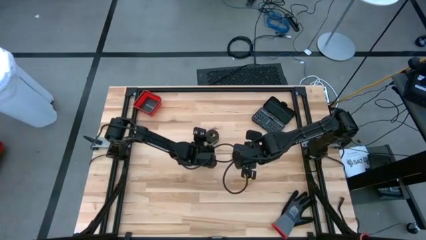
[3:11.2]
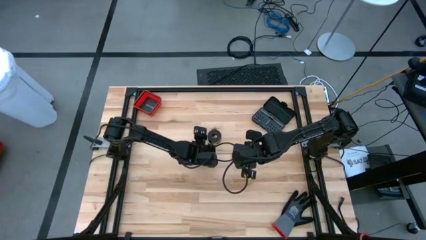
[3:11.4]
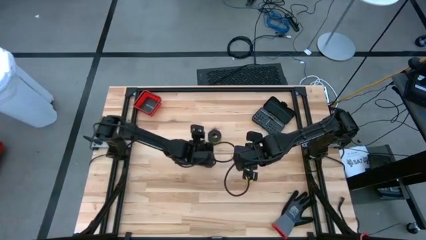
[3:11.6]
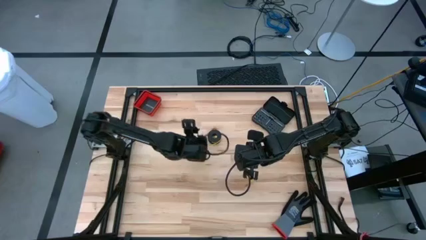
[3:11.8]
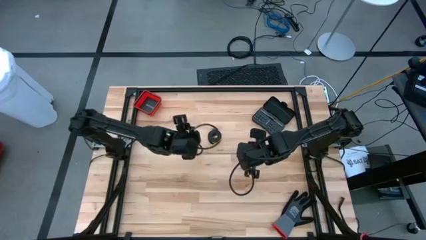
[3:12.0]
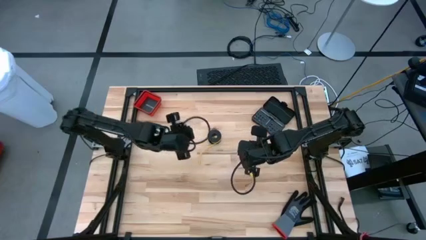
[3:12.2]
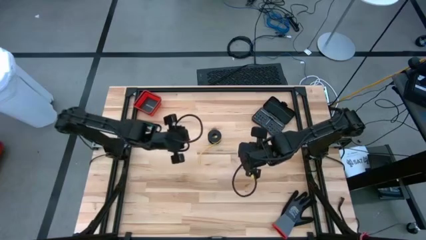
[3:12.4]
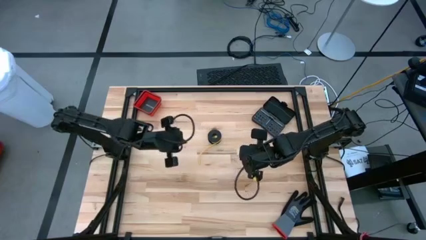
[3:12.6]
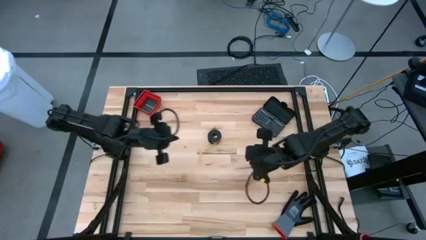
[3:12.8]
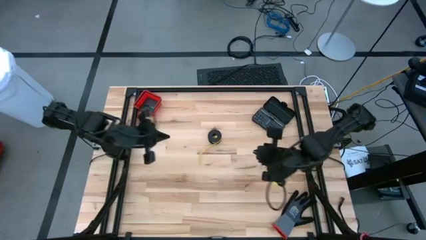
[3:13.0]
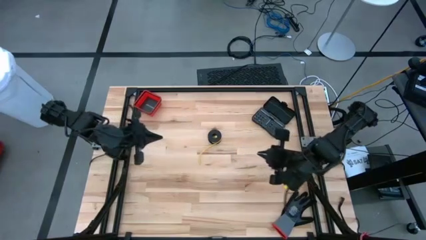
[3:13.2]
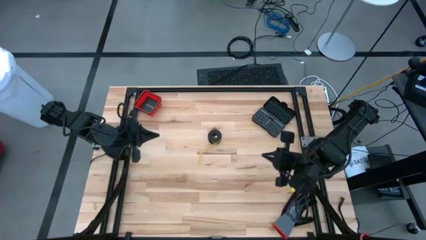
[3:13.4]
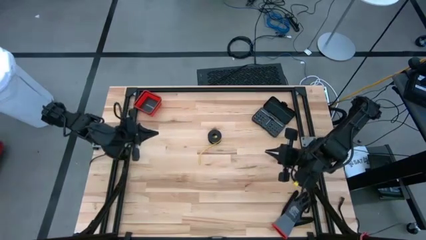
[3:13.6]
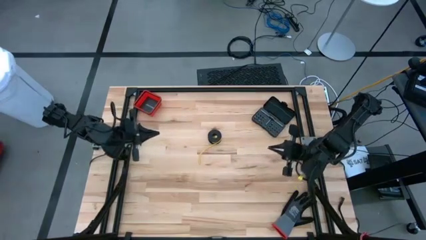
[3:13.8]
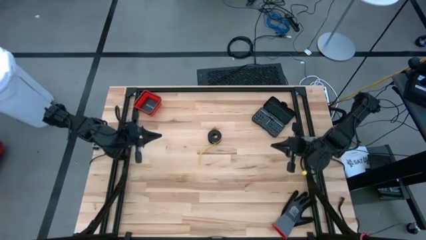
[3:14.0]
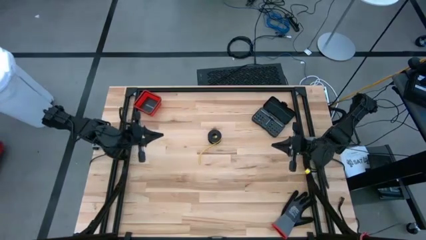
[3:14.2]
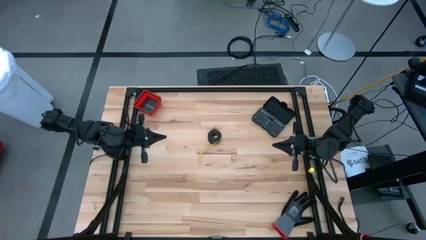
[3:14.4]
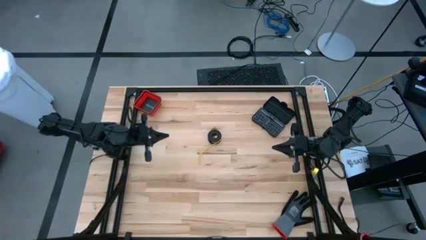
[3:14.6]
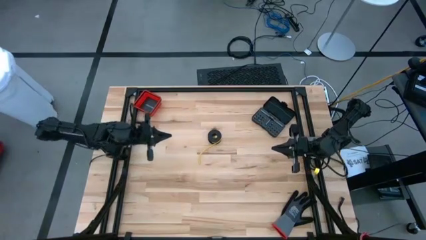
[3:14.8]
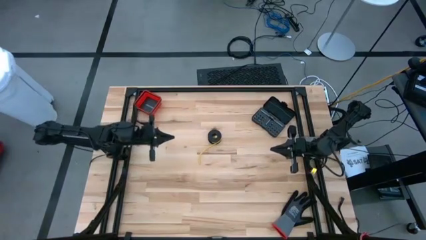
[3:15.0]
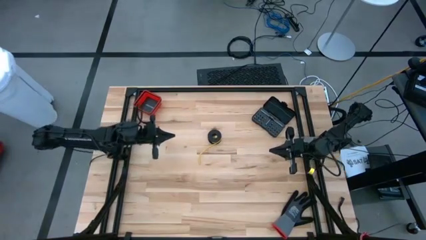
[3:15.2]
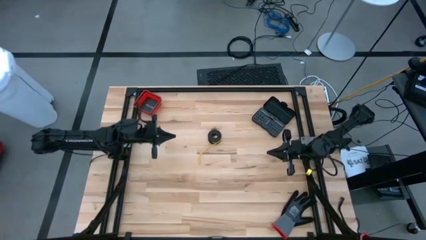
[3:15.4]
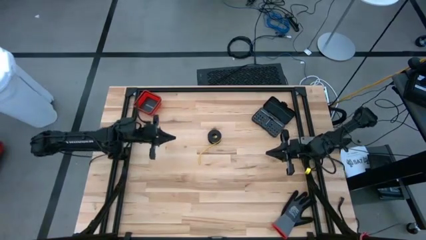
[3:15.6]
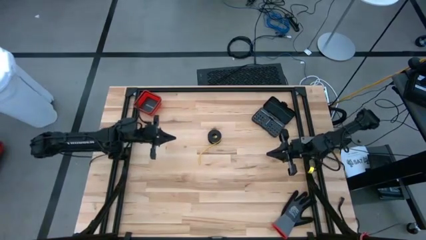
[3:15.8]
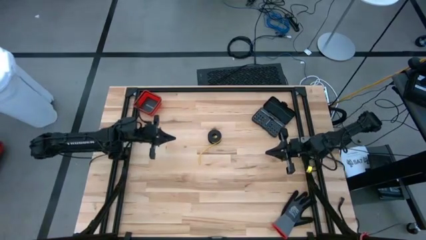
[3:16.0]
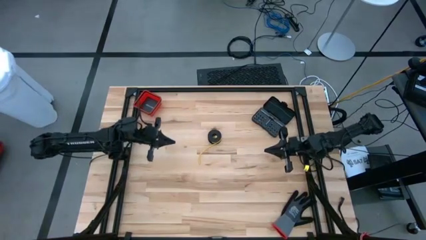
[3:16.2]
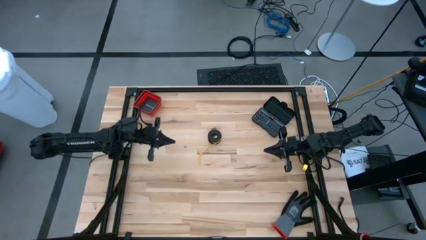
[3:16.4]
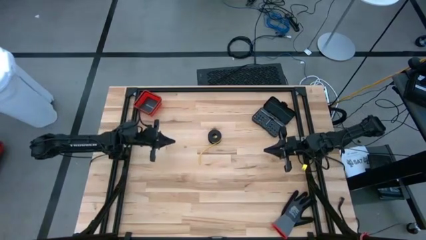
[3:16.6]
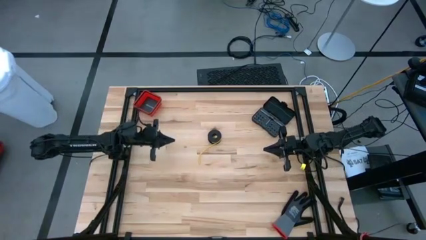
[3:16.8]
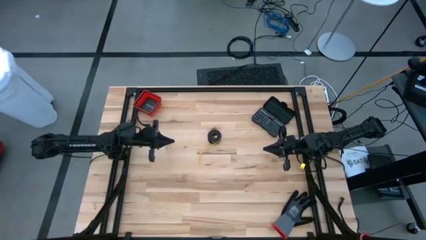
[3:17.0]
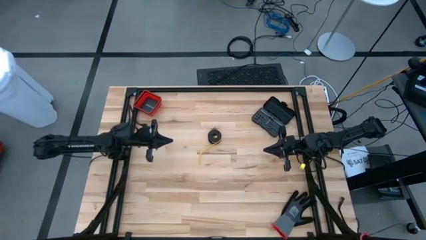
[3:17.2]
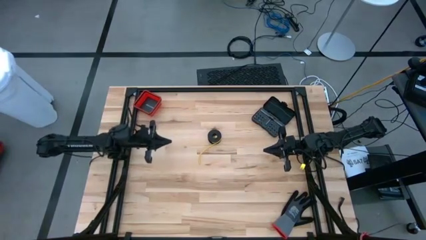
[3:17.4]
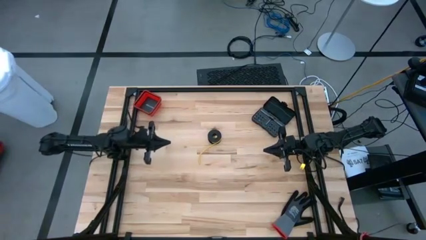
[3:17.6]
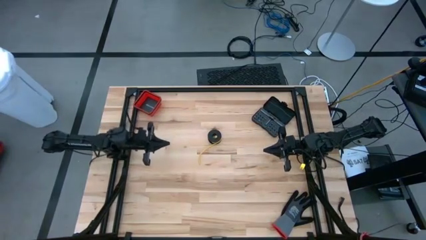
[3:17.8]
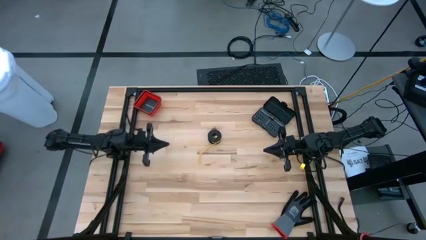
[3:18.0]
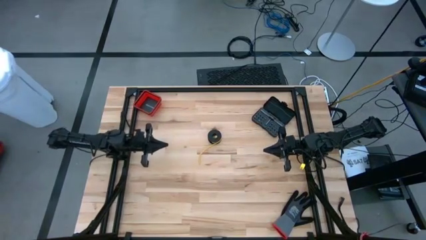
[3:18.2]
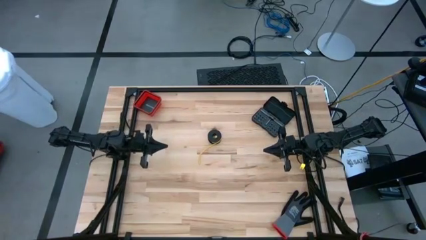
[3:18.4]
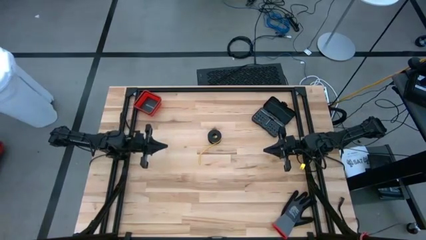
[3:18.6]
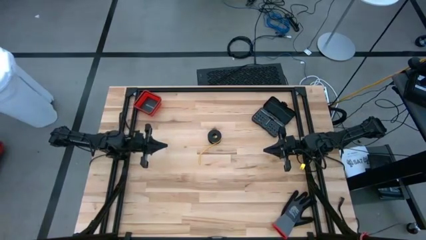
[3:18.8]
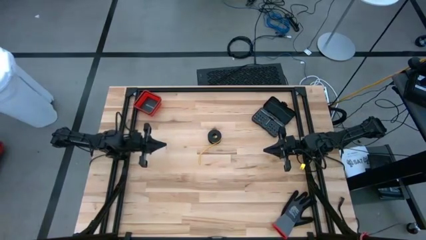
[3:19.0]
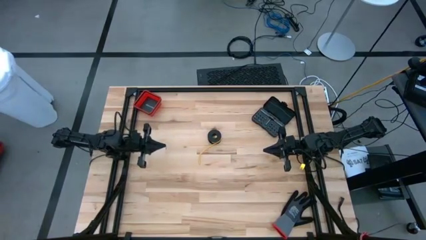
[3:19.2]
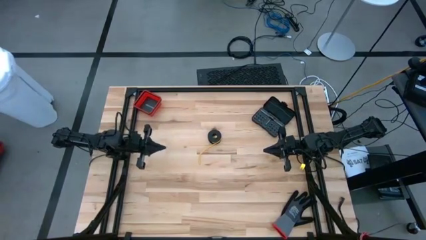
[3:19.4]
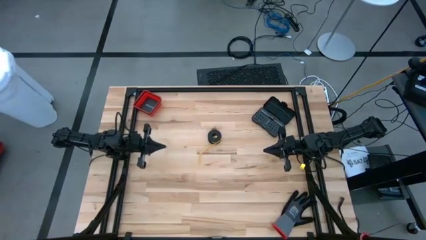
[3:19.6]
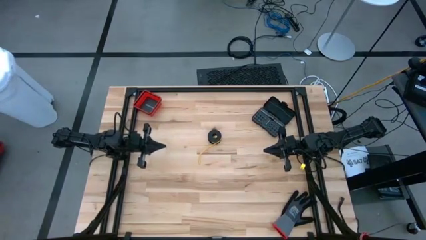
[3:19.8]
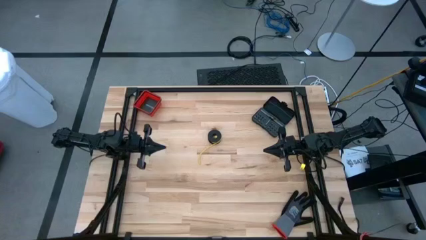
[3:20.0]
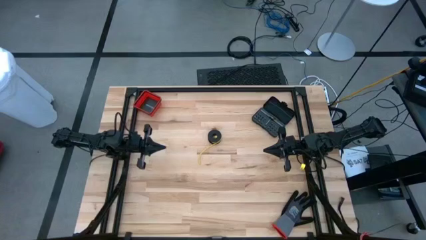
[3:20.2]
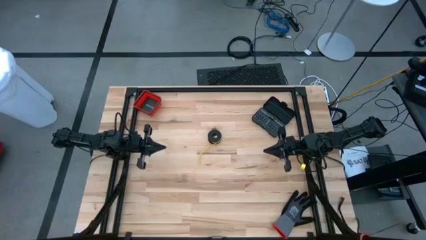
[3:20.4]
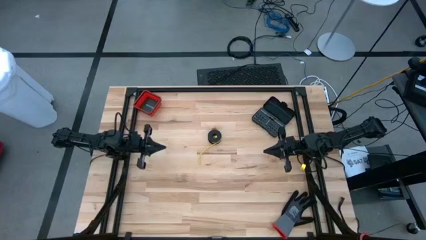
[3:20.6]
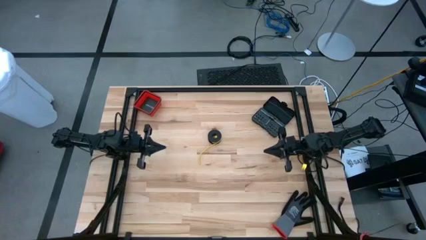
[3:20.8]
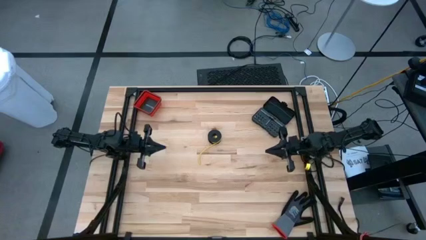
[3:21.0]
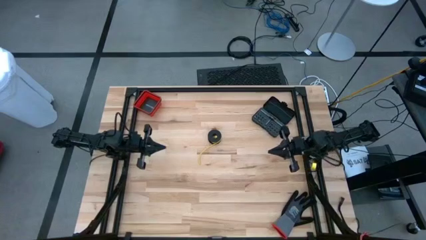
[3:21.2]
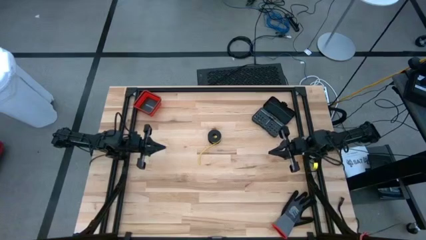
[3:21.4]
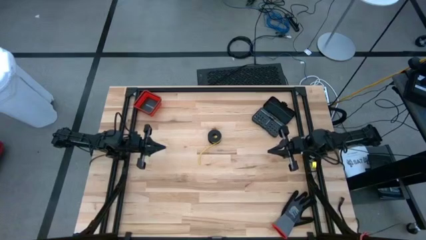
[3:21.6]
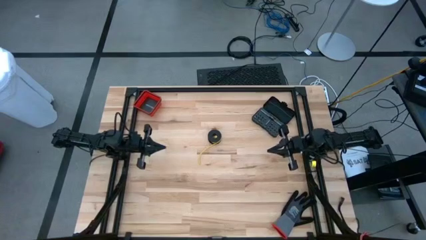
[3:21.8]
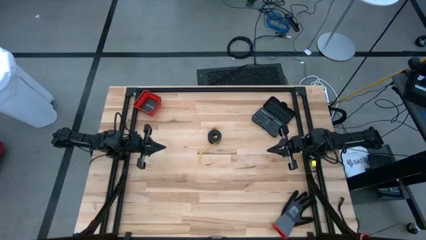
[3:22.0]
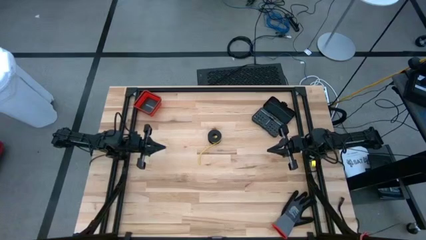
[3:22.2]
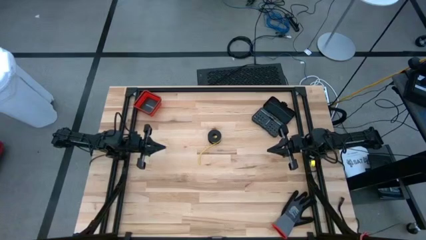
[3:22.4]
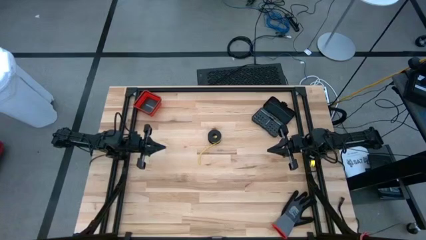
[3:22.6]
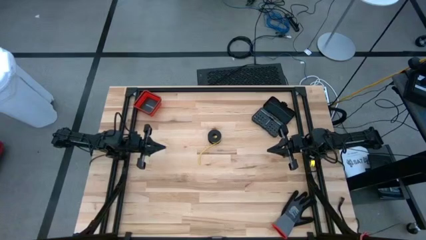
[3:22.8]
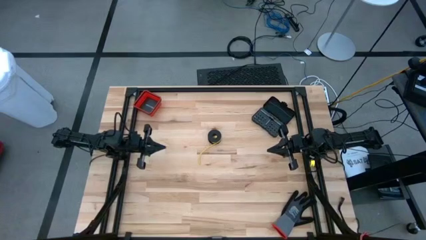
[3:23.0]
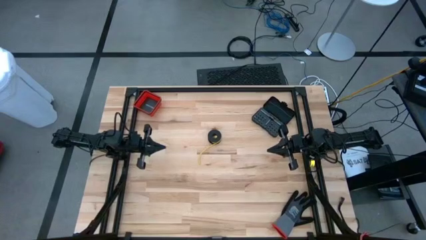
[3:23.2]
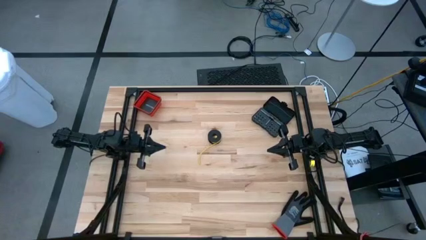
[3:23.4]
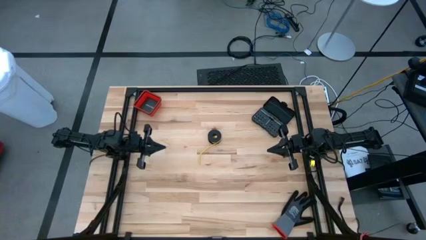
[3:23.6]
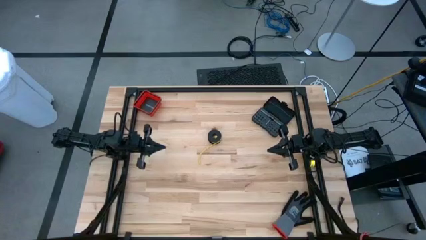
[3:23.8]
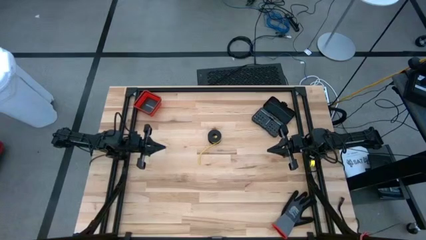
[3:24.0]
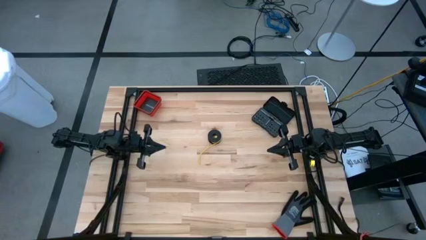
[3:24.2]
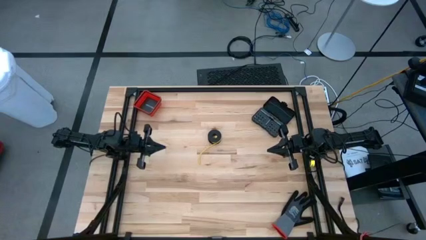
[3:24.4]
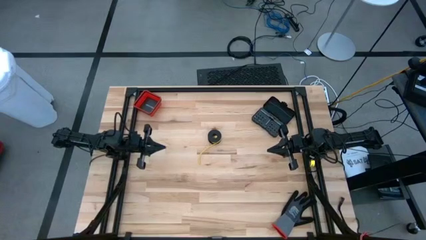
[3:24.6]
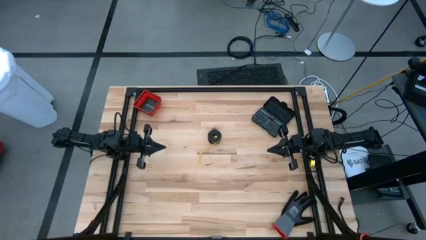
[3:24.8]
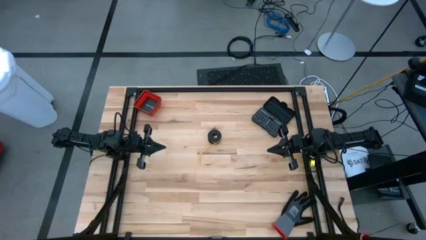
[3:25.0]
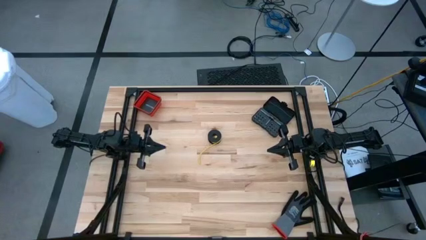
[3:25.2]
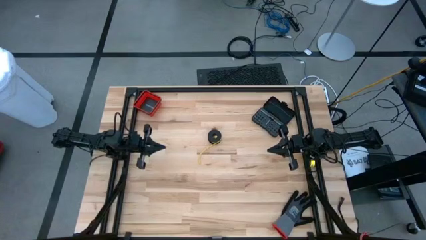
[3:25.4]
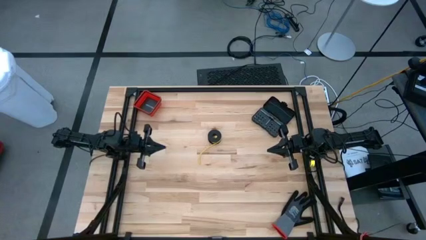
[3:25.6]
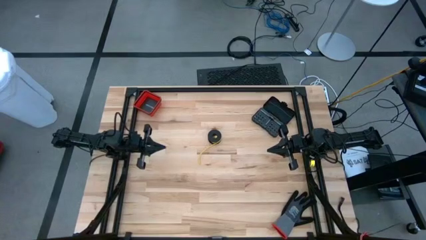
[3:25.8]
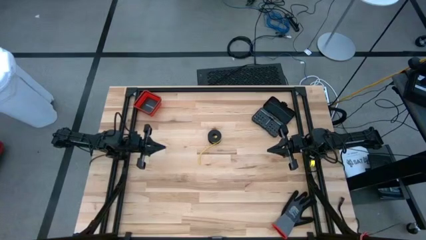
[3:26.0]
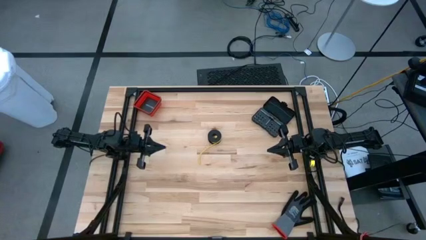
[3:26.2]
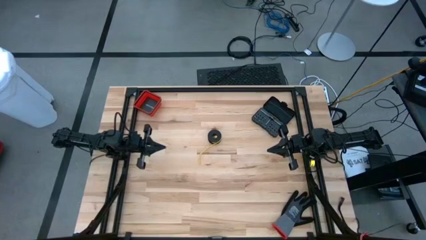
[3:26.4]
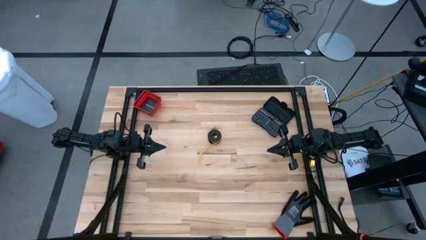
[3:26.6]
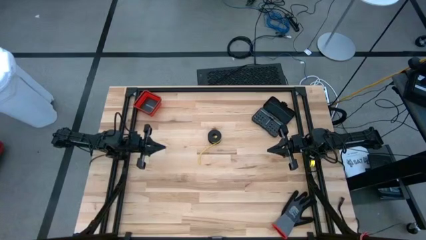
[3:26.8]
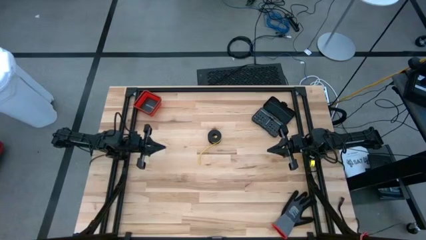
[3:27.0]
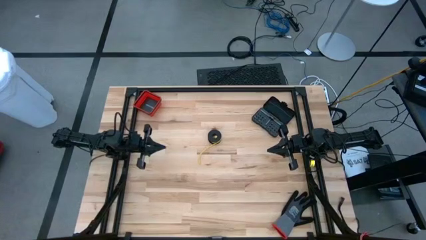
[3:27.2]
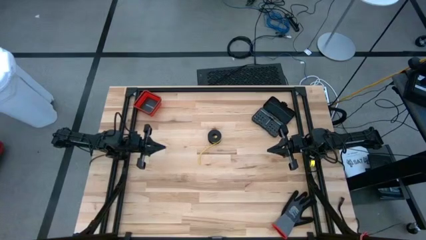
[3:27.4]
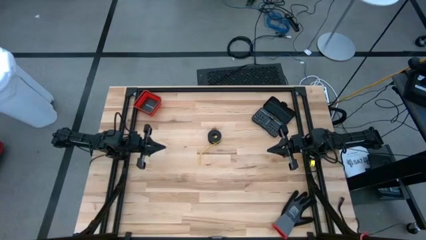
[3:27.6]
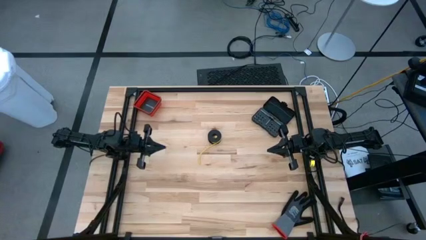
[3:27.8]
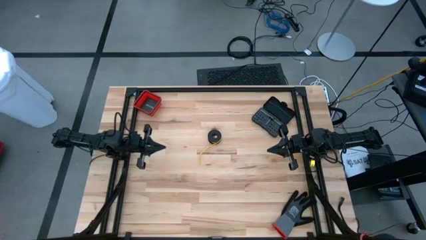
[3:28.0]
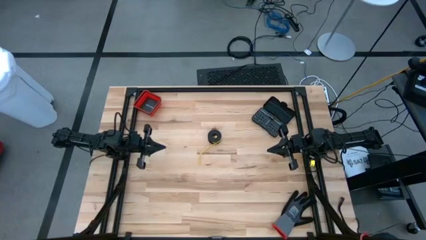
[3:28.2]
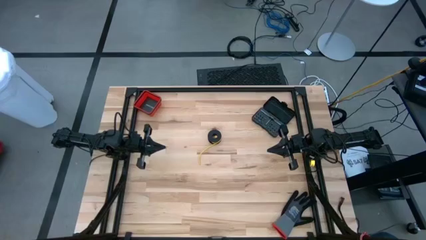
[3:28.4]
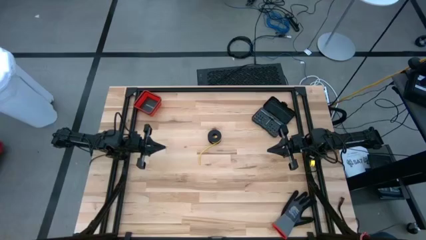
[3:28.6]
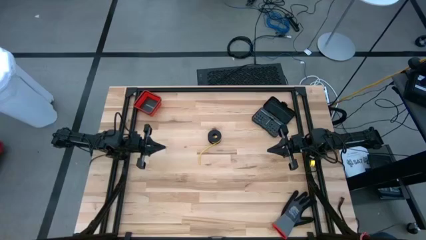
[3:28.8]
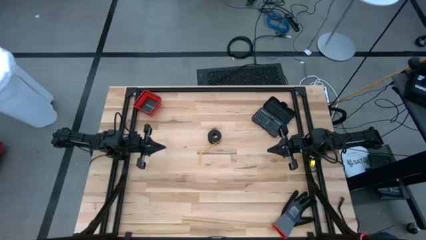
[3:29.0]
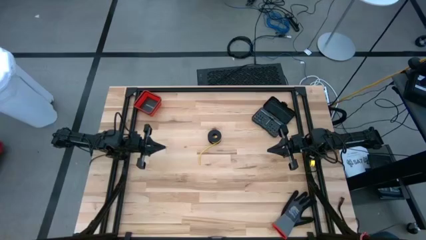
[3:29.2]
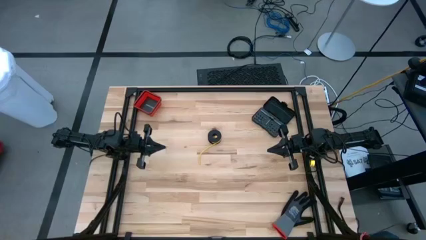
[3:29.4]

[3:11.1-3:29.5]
Task: Coil cords
Return to Home Position
